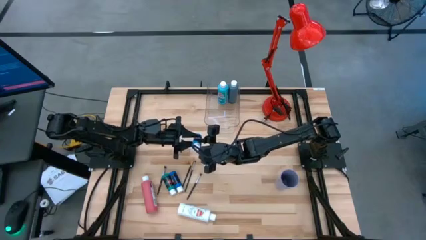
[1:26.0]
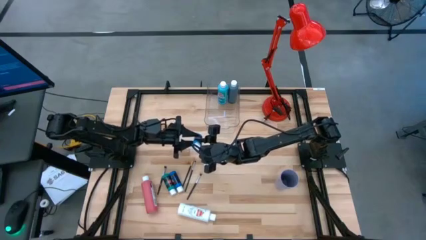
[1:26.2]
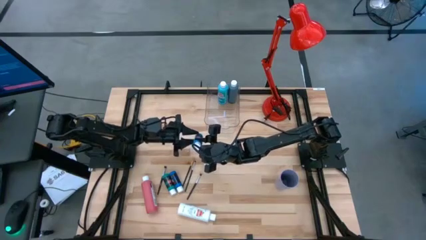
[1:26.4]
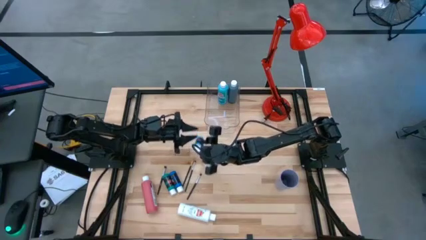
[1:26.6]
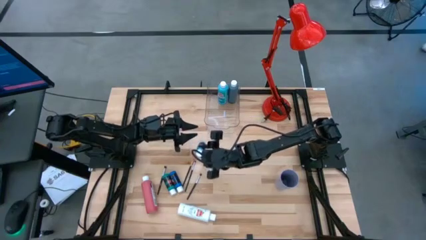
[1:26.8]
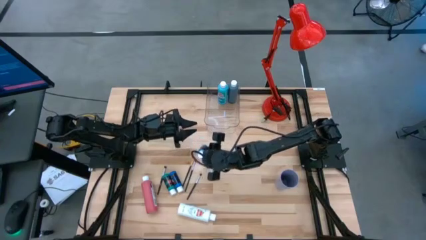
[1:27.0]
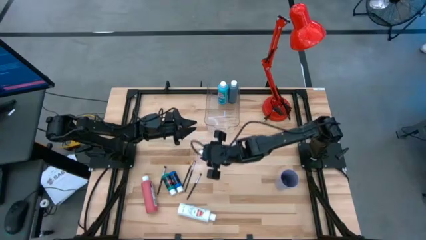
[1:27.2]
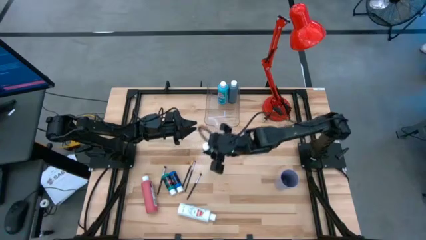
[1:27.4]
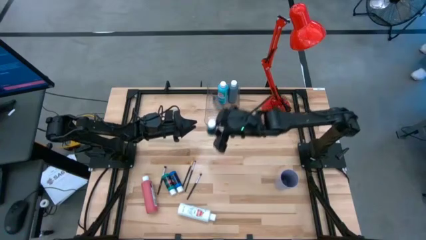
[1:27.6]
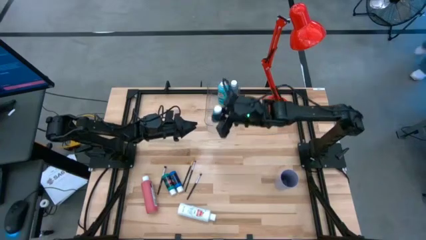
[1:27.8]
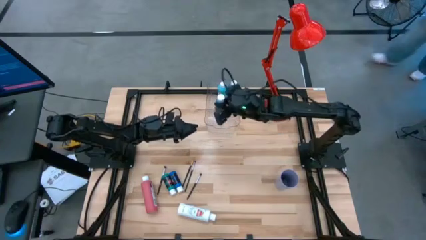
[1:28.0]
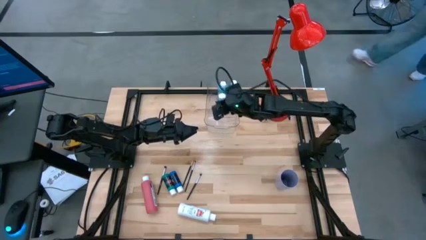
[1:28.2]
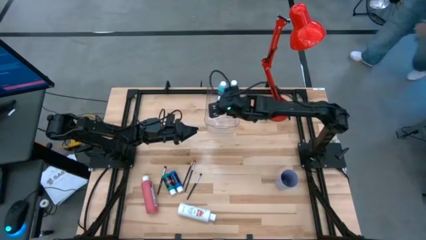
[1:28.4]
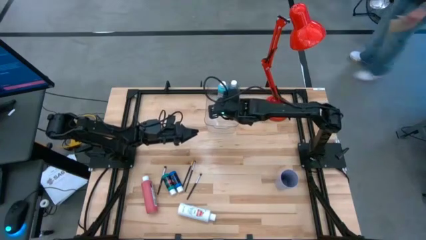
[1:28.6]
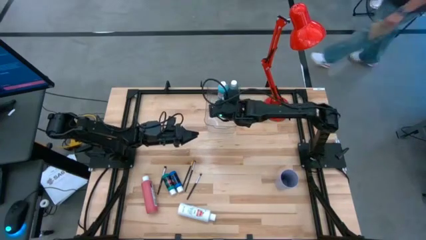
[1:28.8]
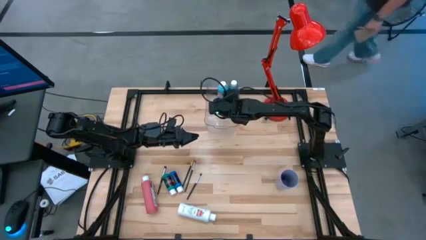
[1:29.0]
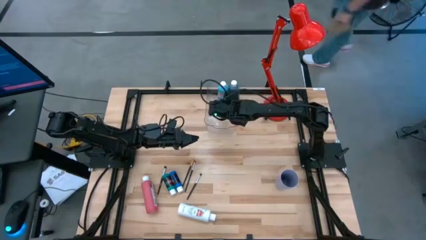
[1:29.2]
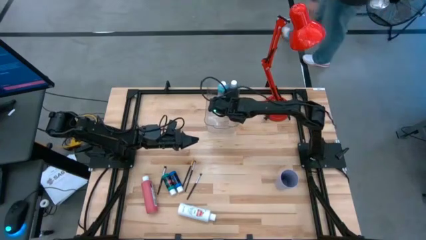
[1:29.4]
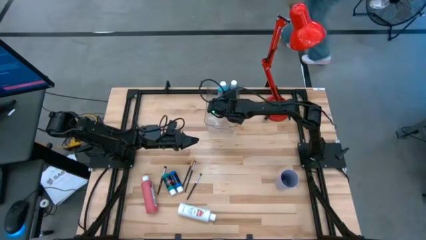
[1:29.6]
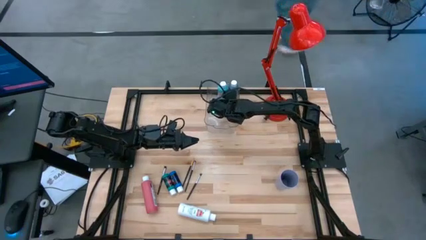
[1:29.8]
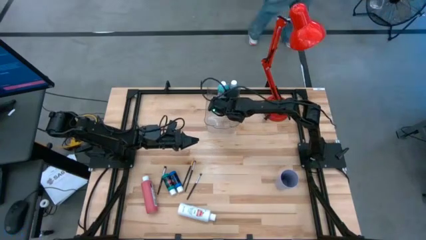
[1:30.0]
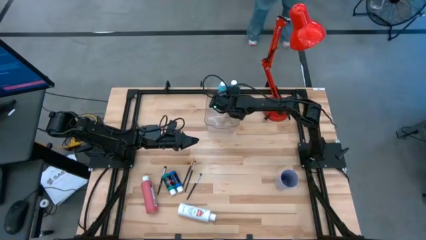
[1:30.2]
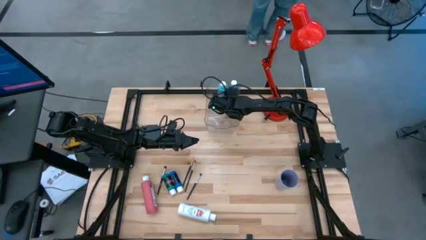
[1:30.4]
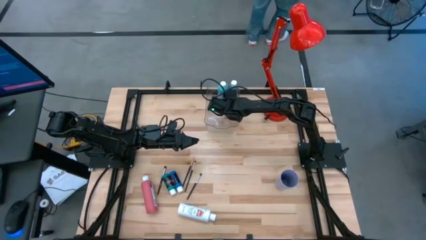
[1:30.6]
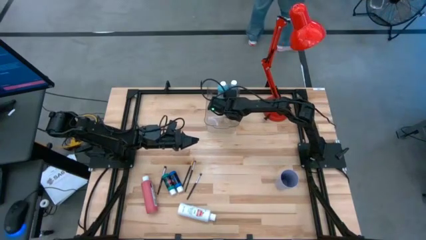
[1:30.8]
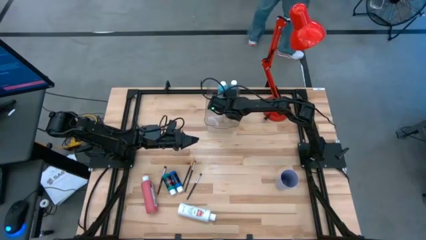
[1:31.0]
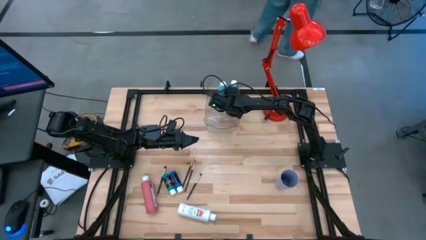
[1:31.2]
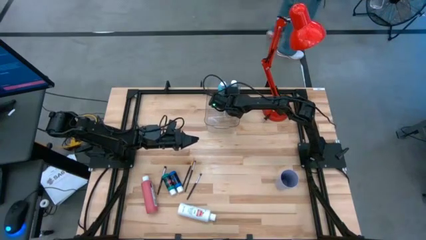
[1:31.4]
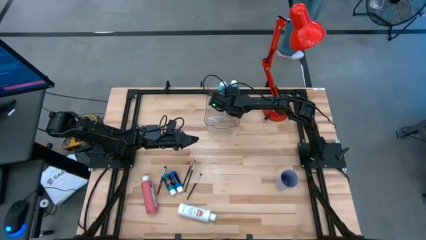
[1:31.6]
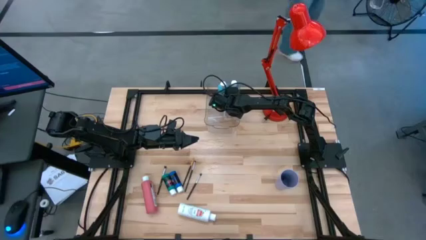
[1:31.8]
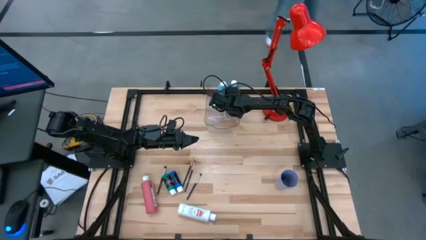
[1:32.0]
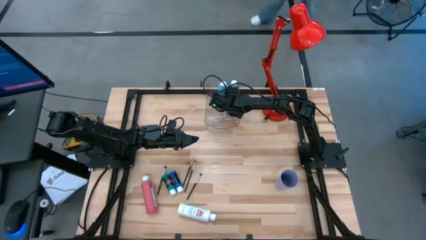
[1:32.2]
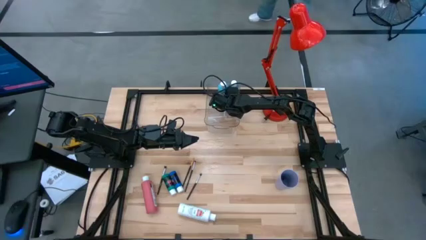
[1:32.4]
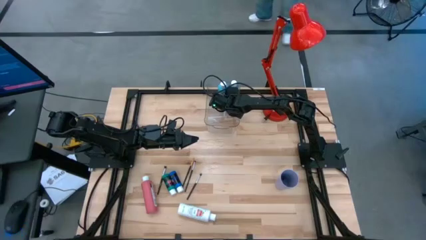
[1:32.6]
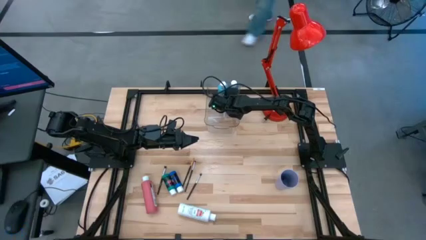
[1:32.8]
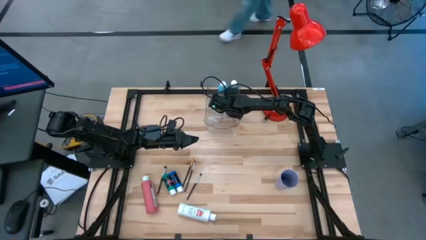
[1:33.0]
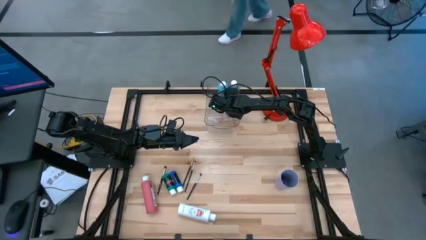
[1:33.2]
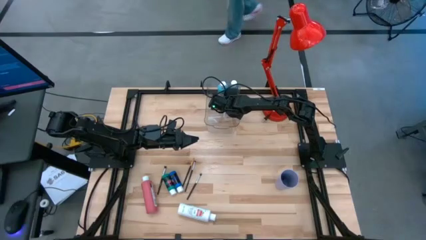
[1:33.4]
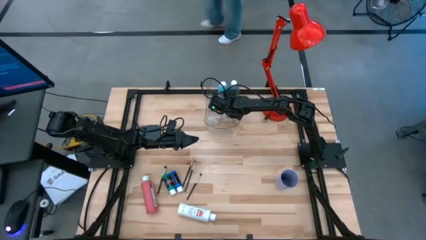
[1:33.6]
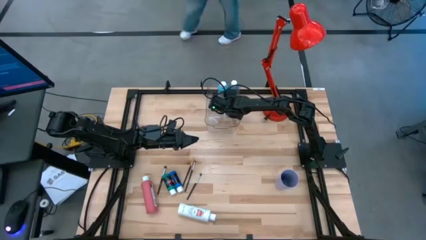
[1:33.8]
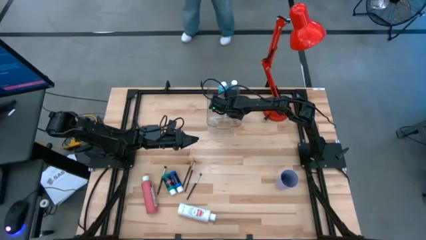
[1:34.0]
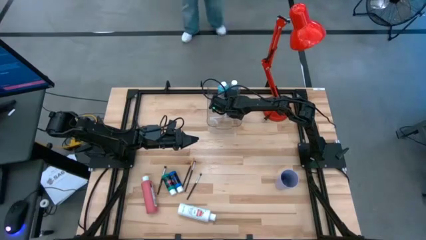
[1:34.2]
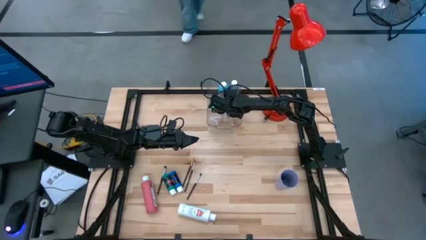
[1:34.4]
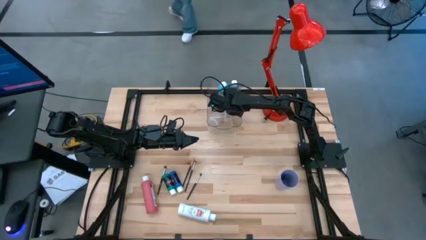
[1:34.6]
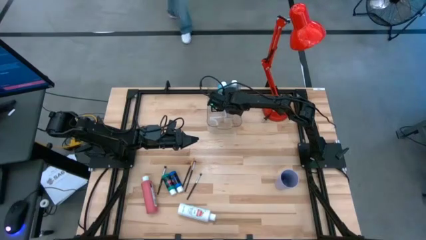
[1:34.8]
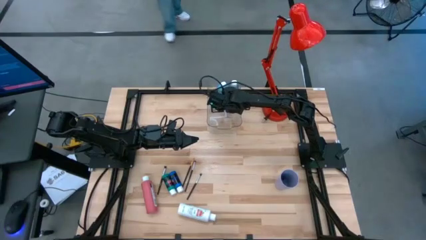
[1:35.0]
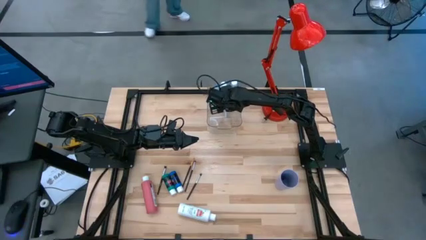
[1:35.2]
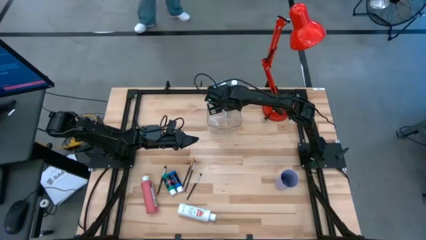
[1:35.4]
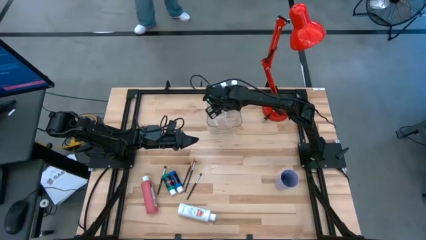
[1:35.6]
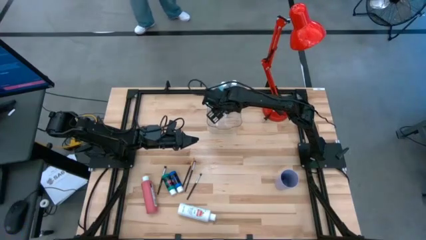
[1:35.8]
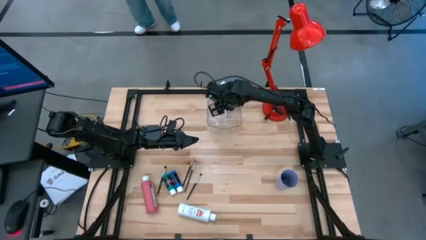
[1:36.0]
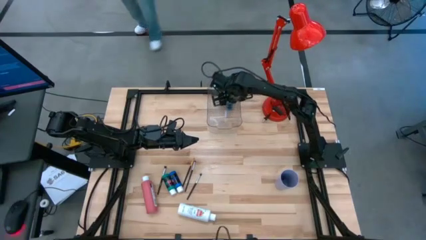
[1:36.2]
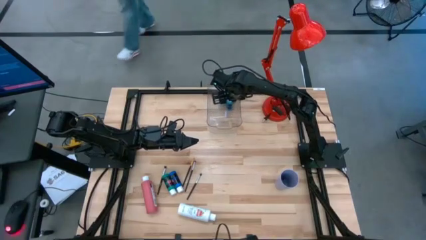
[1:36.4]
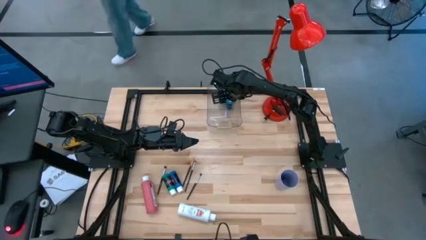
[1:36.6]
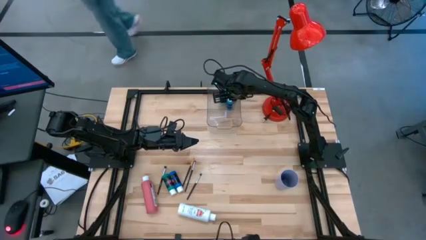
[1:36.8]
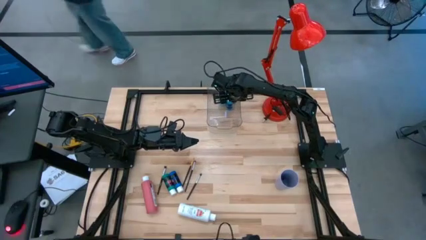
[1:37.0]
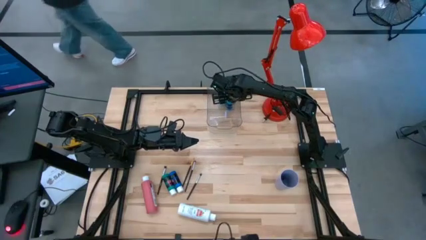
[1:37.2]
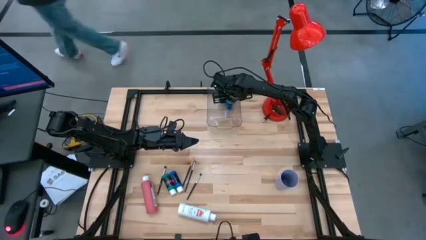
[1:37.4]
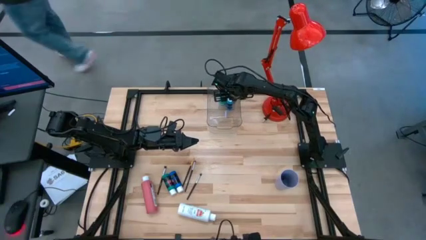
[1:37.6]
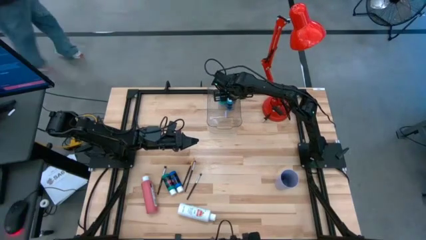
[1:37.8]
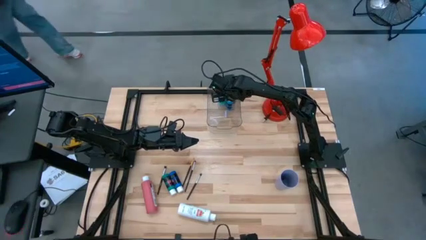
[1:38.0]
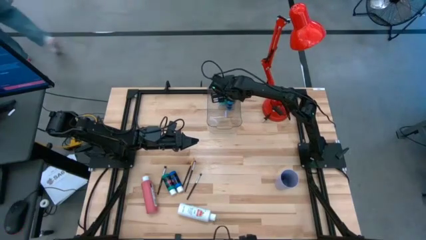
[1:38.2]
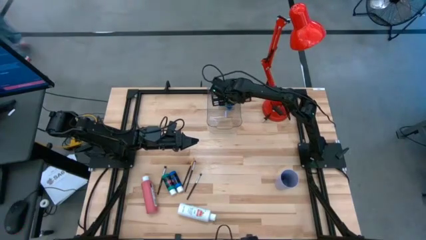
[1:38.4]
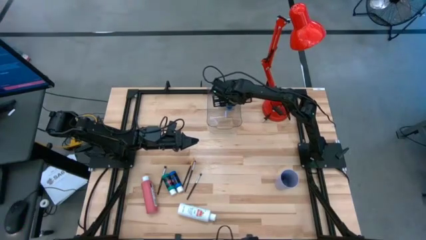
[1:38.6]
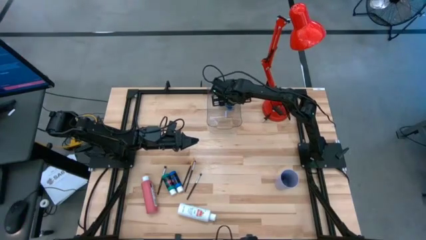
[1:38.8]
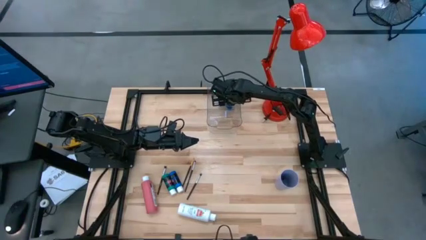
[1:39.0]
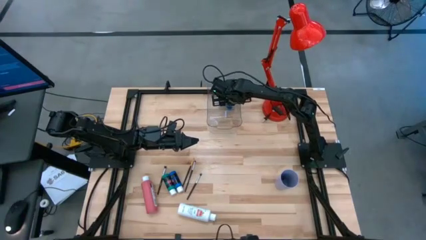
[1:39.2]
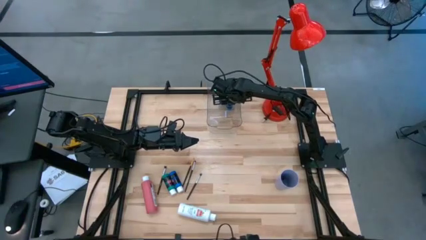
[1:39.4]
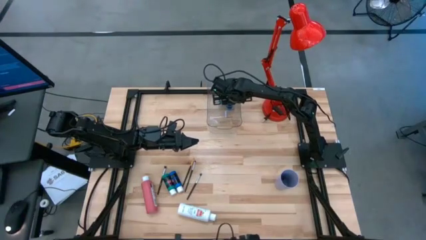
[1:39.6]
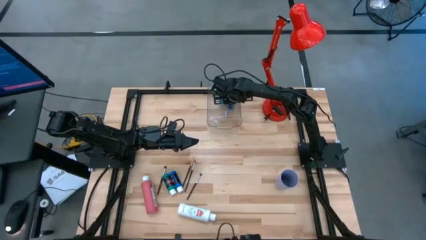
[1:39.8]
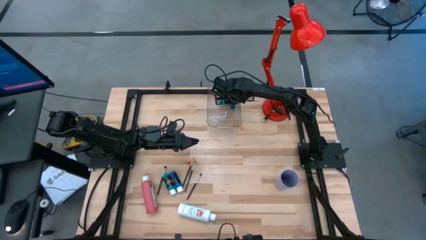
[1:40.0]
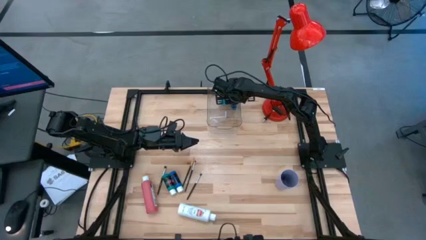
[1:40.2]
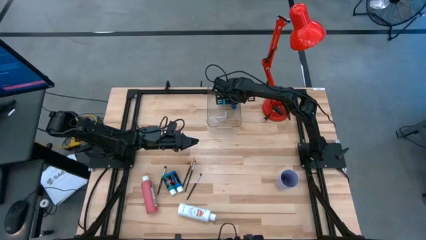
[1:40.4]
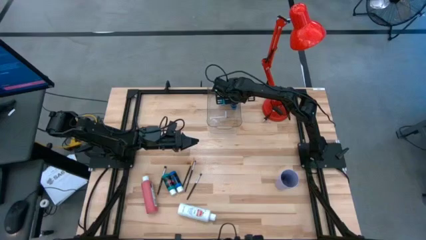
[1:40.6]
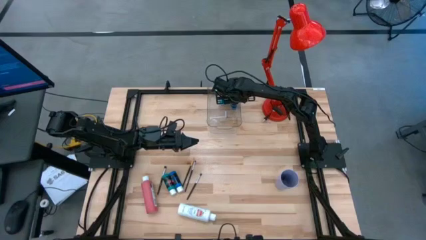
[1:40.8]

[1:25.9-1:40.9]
Task: Pick & Place Paint Supplies
Put the blue paint bottle into the transparent bin
